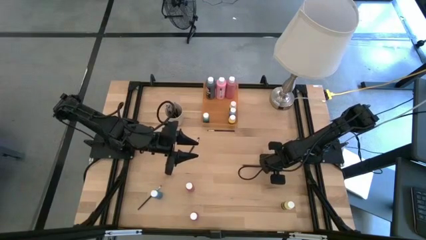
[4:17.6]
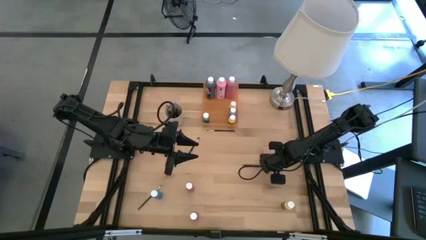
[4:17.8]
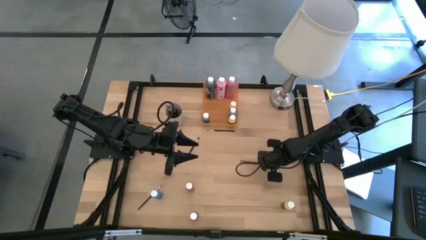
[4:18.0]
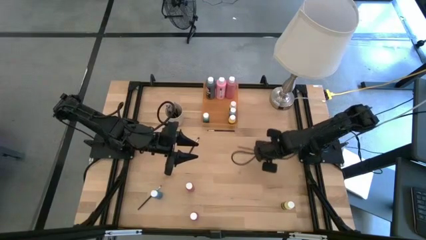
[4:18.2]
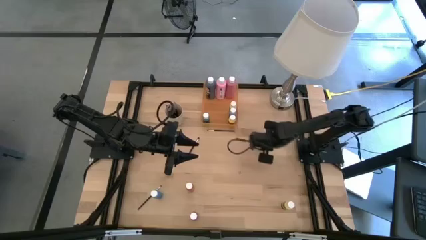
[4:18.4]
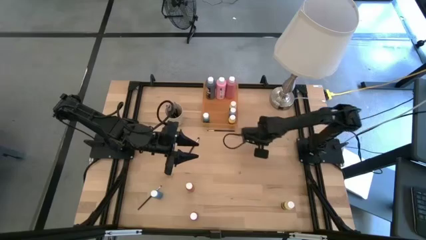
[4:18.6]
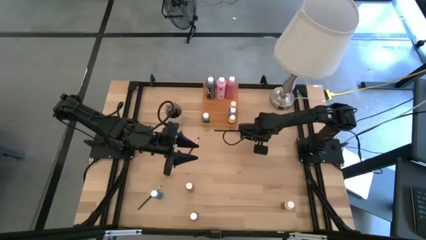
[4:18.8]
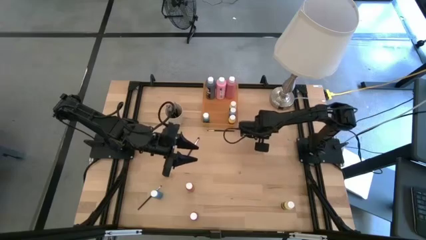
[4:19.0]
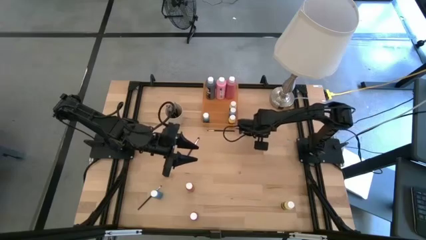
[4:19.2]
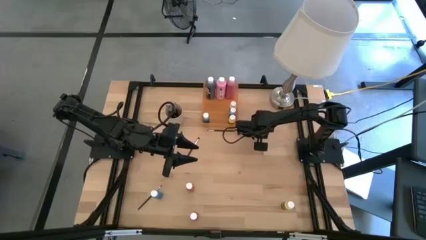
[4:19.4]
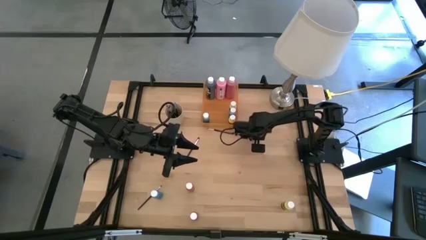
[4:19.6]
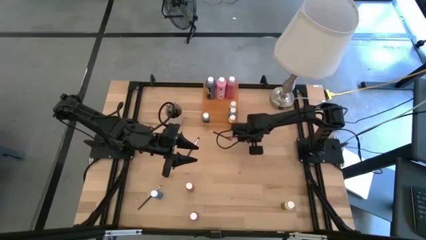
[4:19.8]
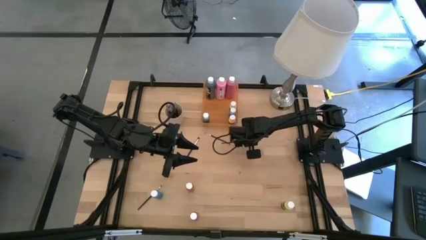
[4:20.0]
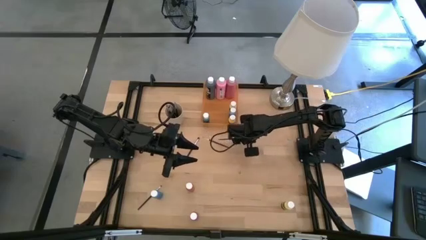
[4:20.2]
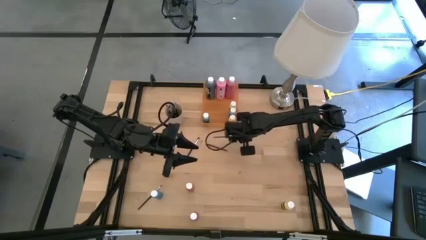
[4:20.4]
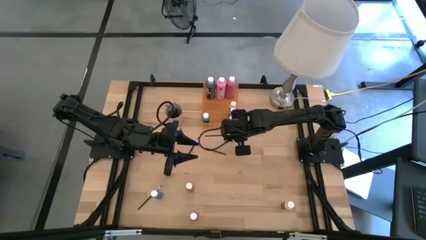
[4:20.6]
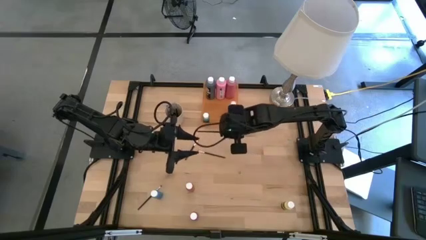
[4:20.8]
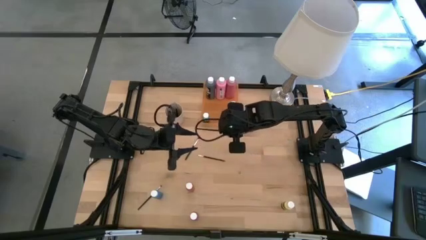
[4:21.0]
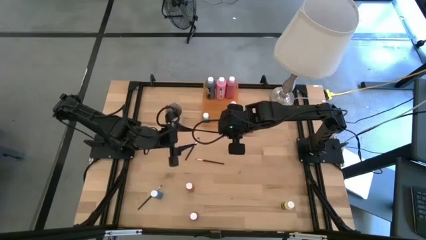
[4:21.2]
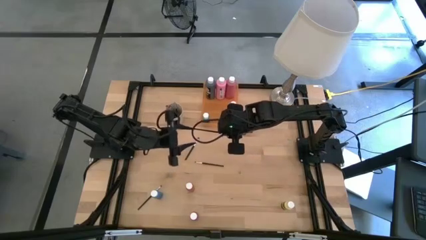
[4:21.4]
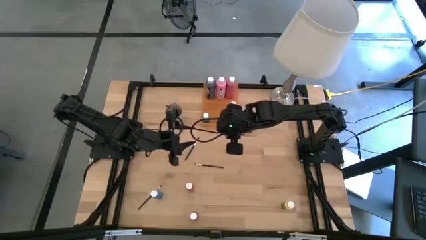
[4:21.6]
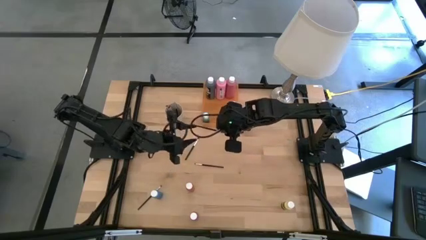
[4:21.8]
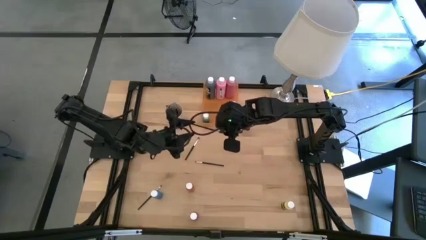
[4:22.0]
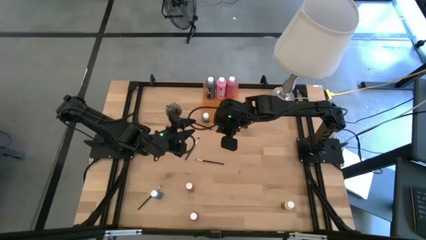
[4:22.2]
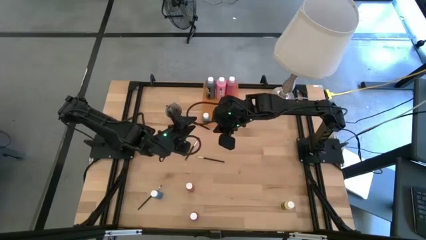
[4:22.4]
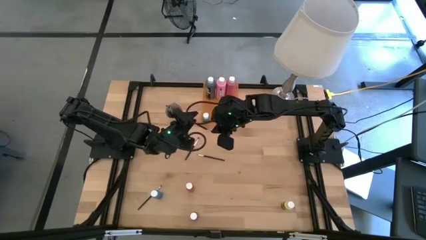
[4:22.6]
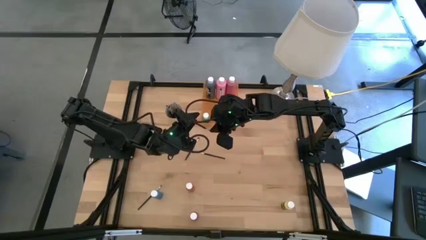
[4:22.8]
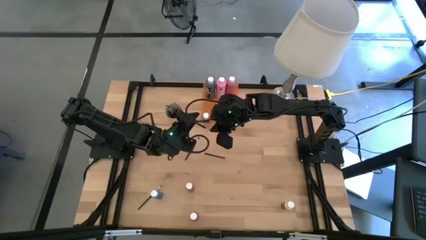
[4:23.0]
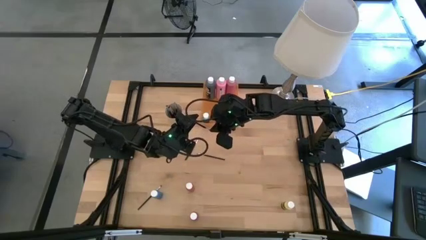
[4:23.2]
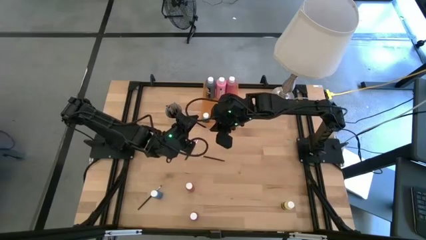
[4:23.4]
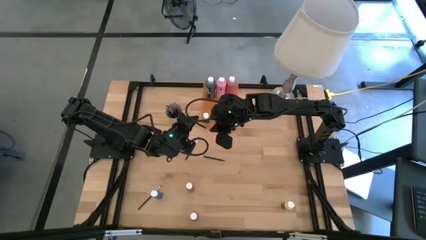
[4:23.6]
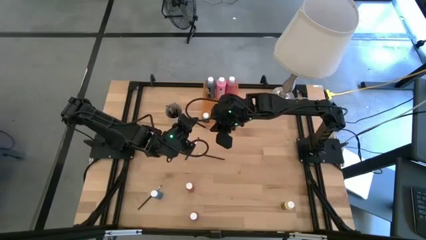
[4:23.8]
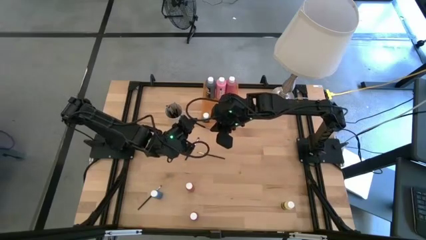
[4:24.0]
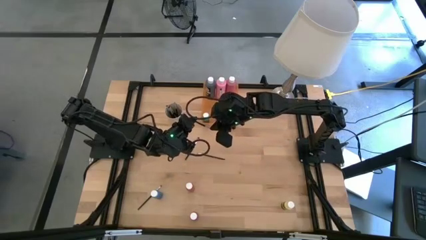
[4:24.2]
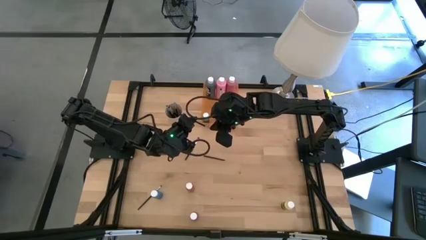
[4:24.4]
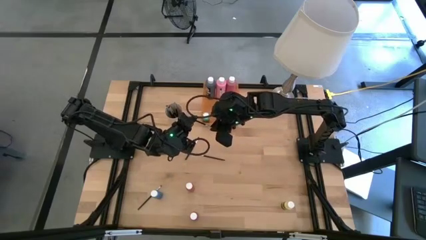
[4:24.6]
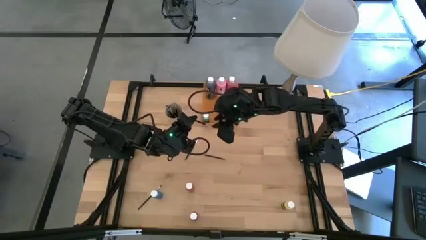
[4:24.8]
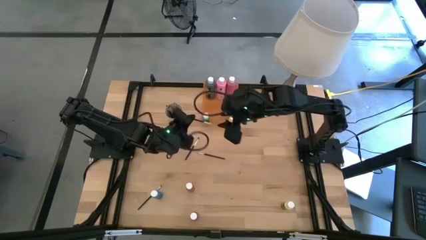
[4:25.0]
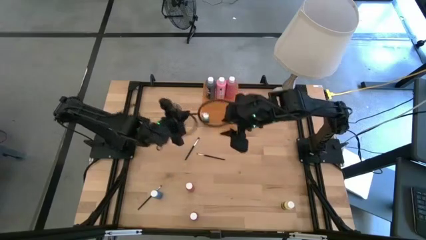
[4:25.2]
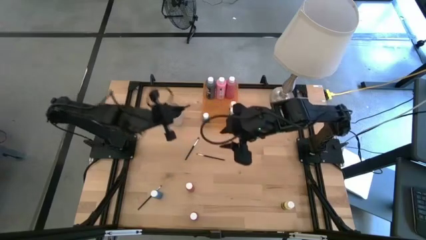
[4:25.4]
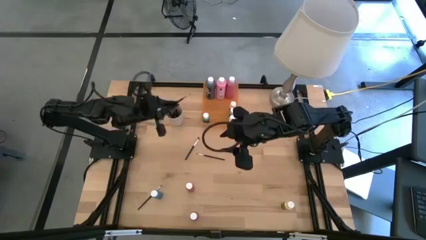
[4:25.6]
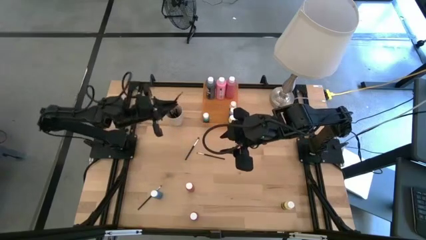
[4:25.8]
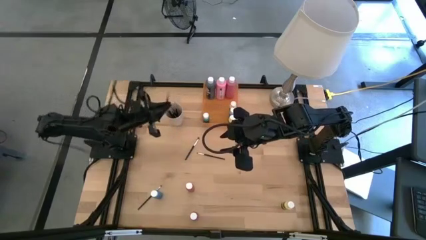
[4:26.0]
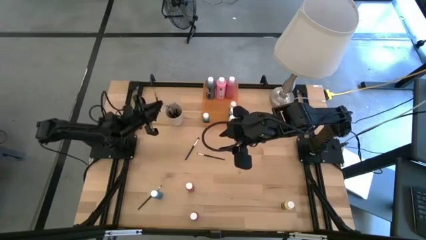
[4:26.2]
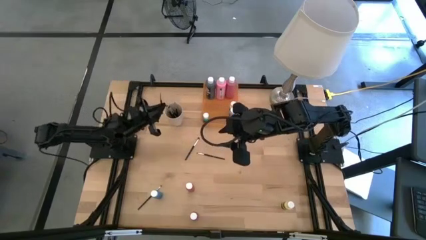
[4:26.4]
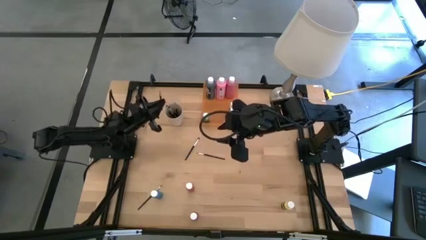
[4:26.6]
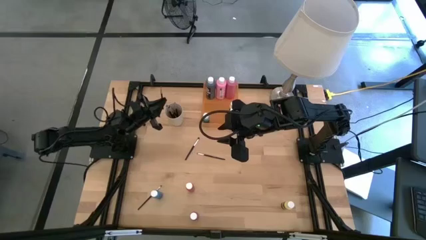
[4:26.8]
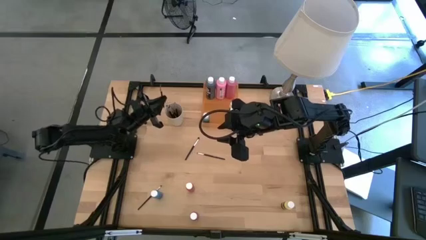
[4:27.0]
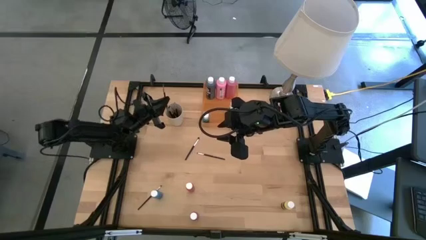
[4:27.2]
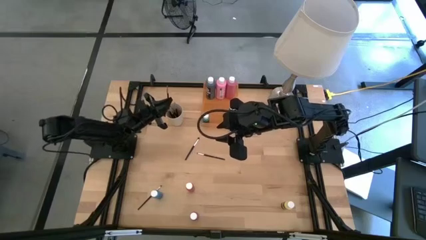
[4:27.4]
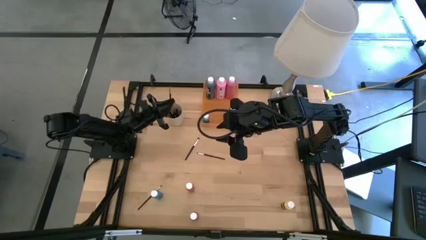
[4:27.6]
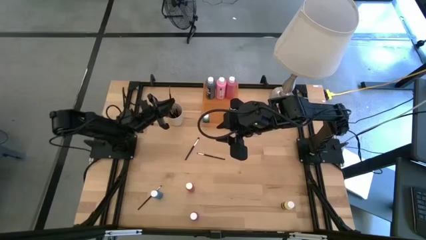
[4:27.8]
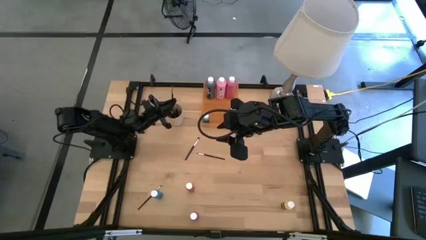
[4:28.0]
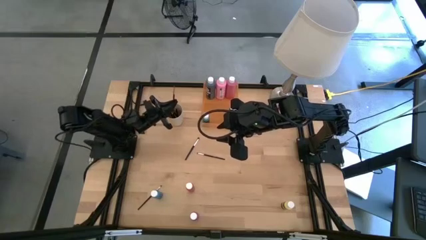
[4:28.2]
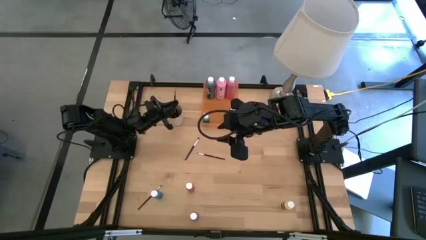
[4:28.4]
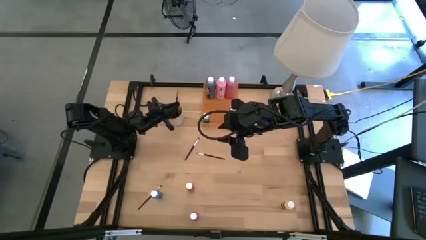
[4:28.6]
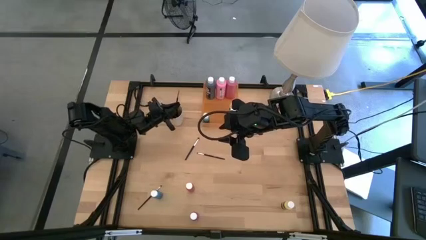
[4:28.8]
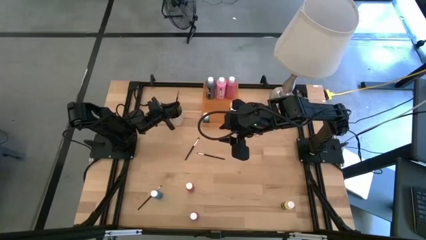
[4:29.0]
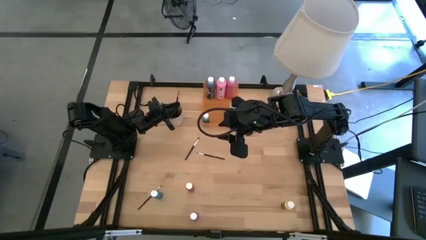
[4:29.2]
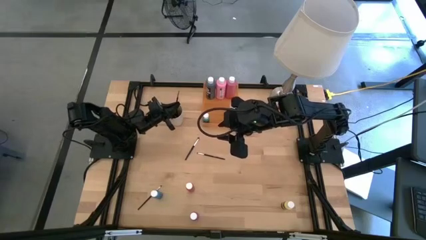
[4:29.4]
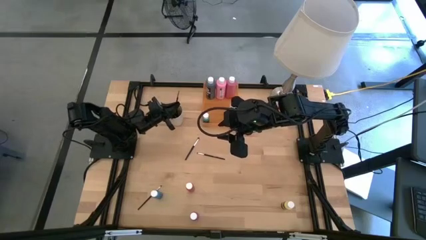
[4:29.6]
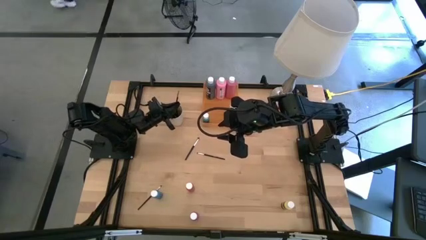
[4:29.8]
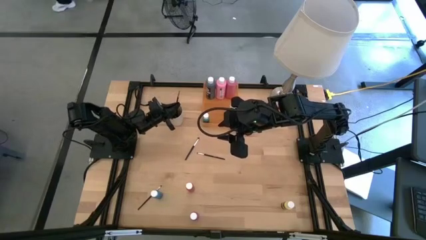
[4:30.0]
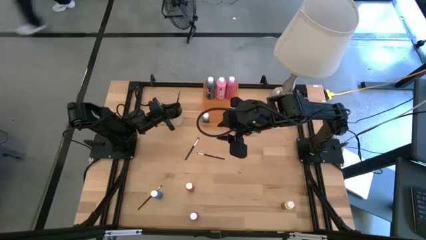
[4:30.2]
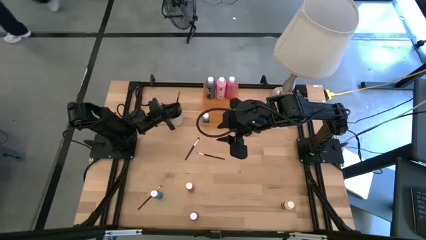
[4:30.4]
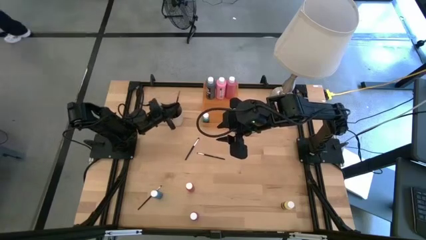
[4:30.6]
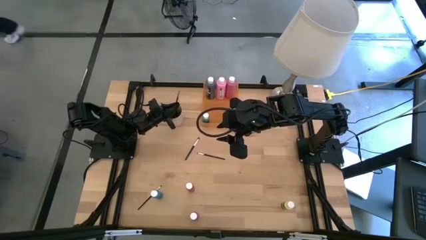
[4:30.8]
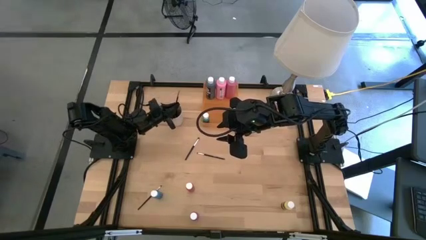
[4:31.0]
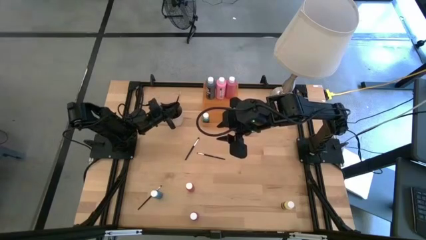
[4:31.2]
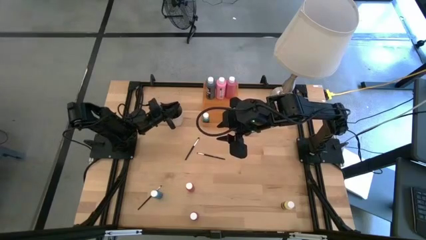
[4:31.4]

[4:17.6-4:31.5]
Task: Pick & Place Paint Supplies
Put the black paint brush into the white cup

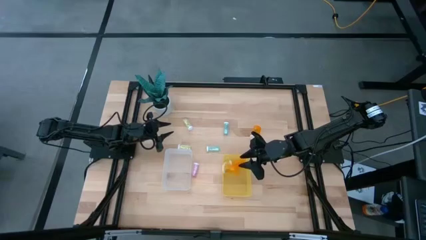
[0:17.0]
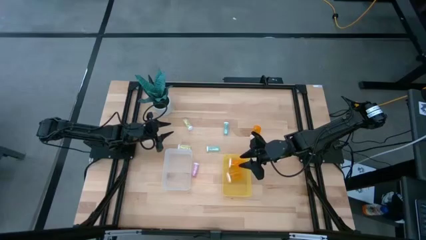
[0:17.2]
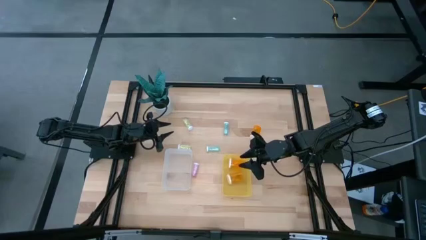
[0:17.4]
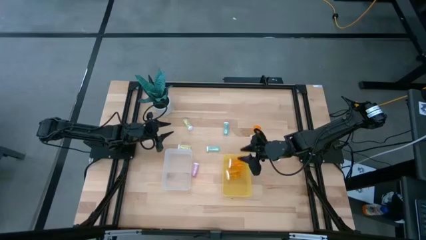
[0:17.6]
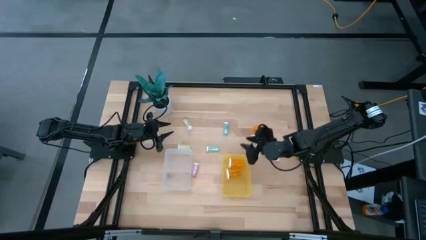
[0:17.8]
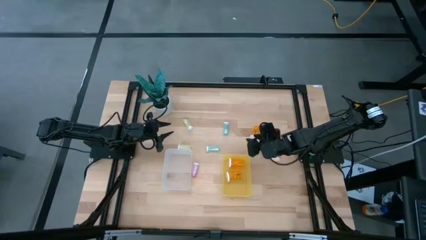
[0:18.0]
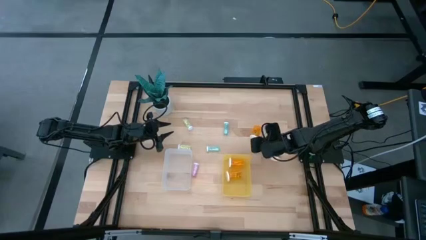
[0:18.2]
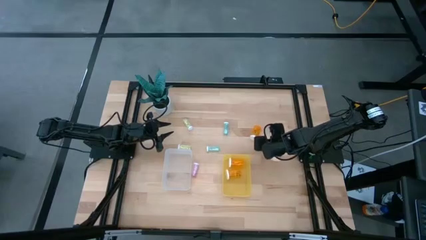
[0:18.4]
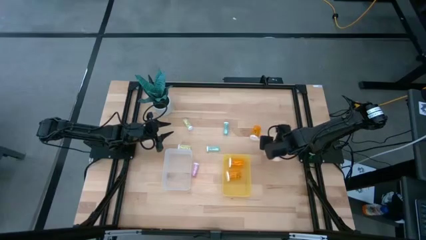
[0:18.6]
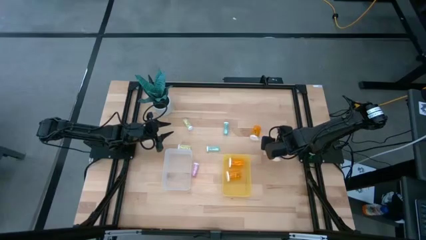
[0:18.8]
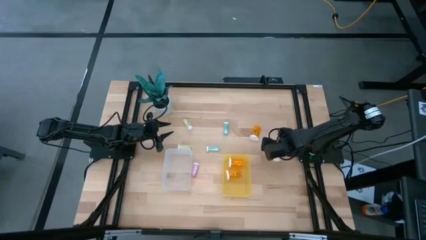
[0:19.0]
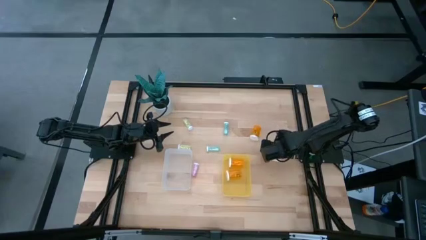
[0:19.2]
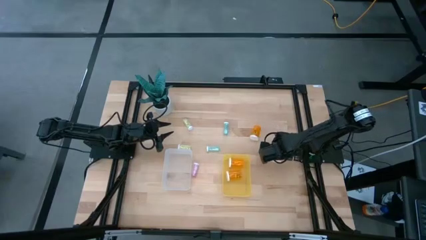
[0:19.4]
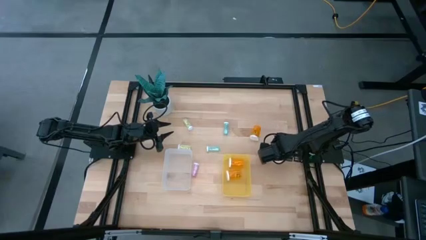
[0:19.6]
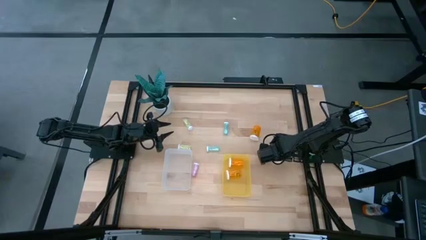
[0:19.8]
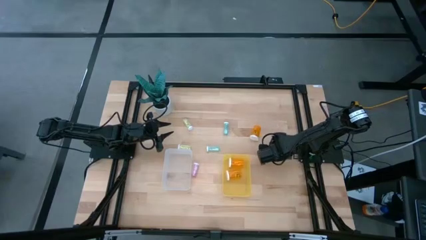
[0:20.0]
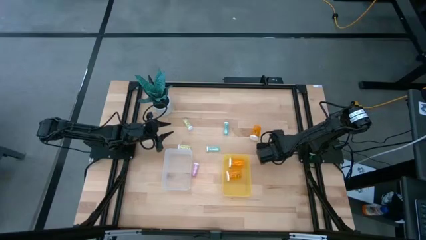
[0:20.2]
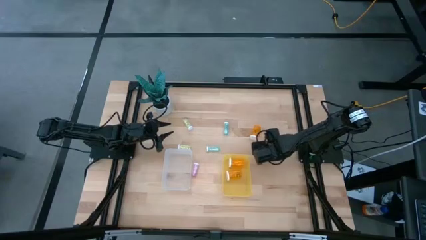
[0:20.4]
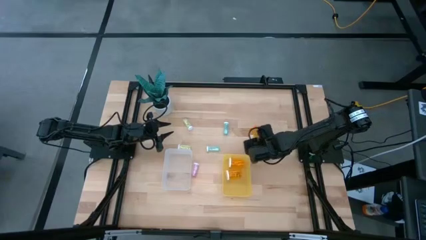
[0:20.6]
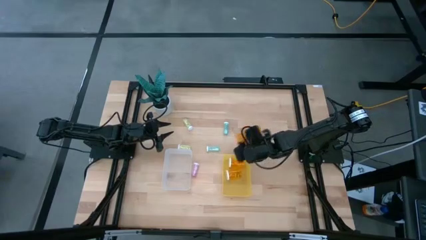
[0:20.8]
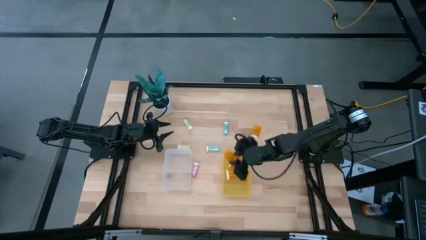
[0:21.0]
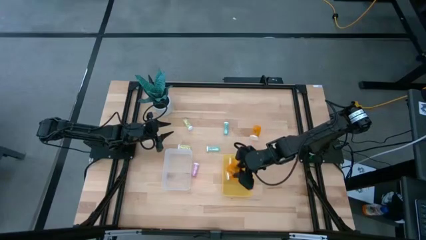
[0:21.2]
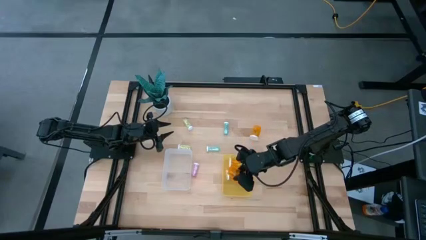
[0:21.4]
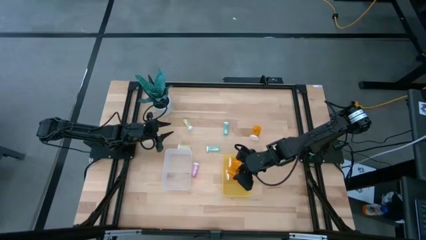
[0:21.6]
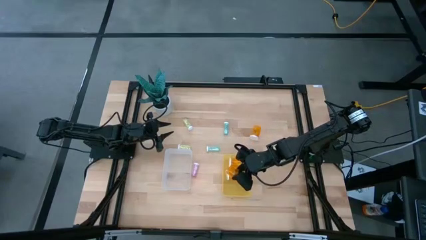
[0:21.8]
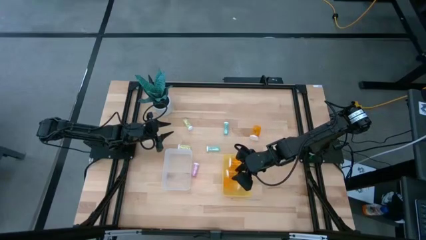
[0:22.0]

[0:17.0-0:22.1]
Task: Pick and place medicine bottles into bin by pill shape (circle, oval)
Put the bottom orange pill bottle into the yellow bin
